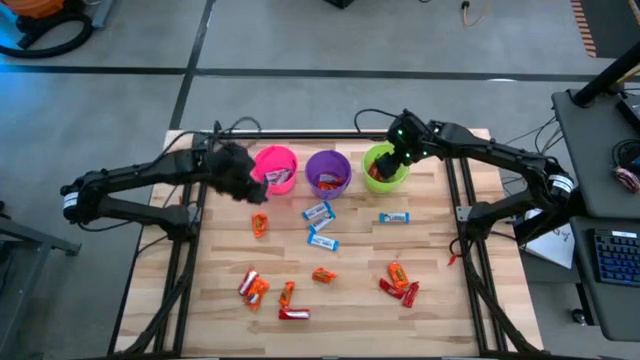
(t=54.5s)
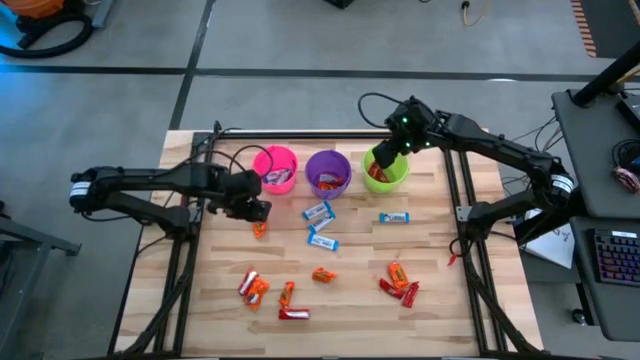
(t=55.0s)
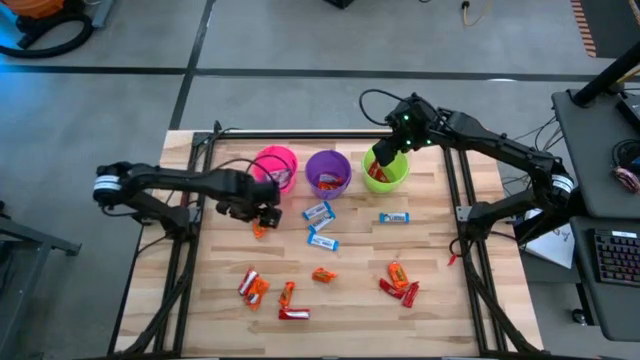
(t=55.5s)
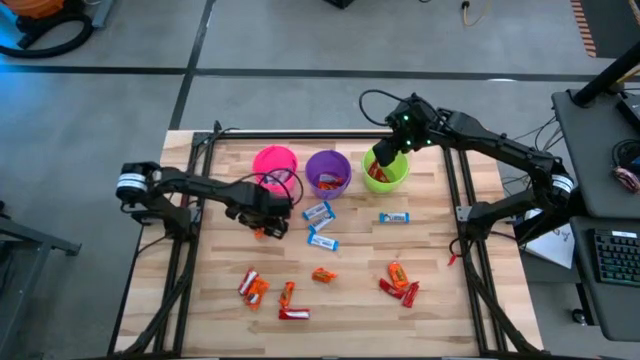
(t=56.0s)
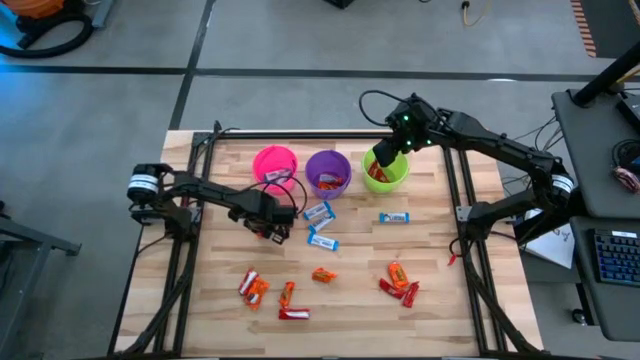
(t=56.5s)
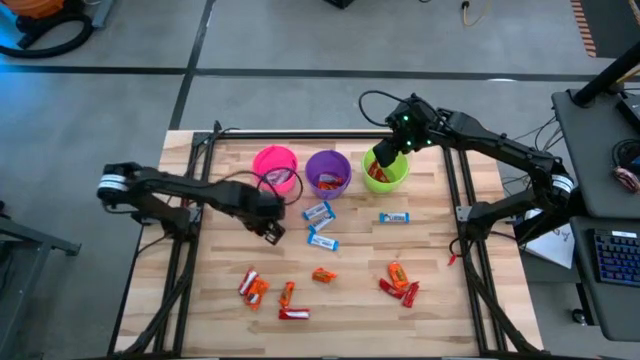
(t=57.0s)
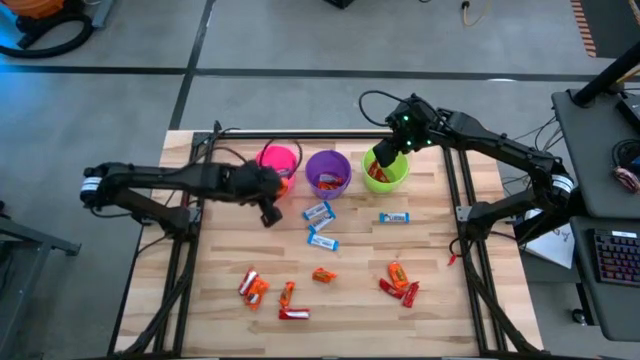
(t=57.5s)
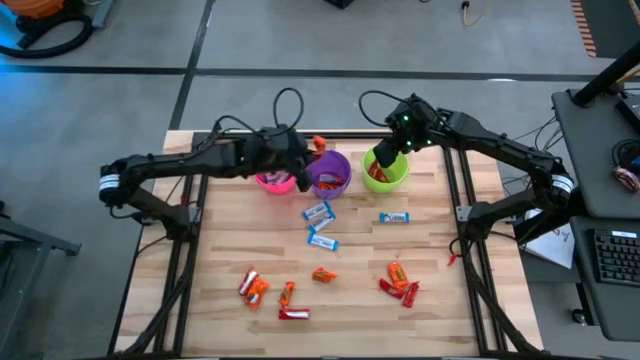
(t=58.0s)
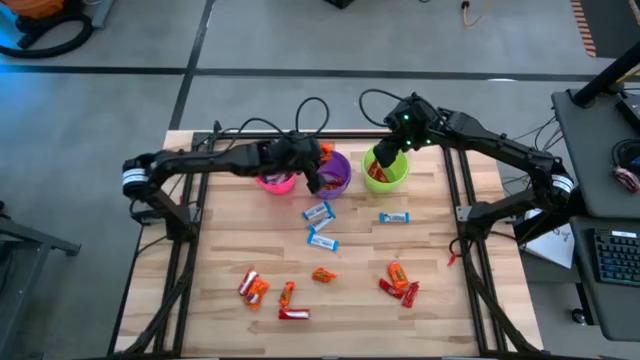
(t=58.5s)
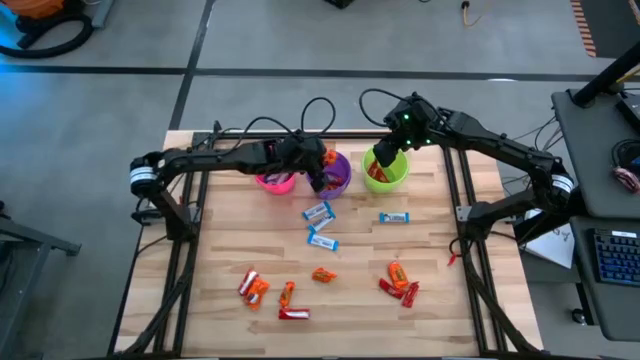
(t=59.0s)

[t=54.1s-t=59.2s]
Task: Organize candy in baskets
Put the orange chocolate into the violet bucket

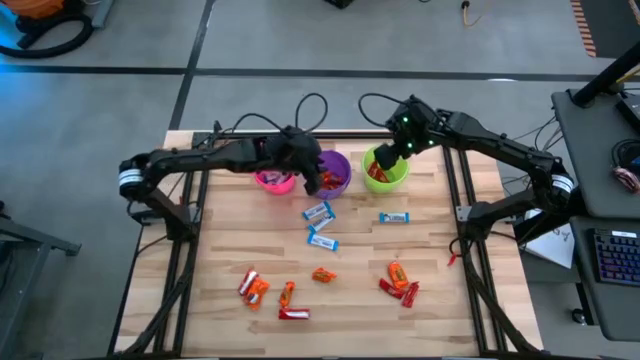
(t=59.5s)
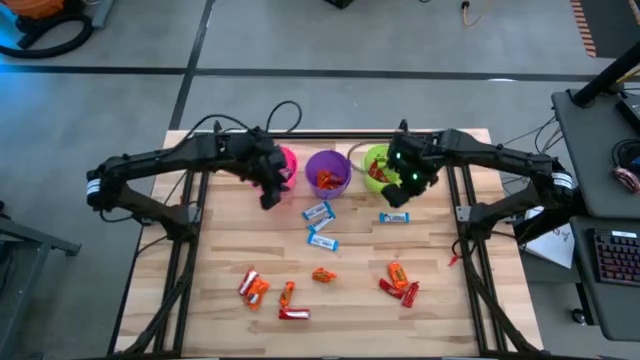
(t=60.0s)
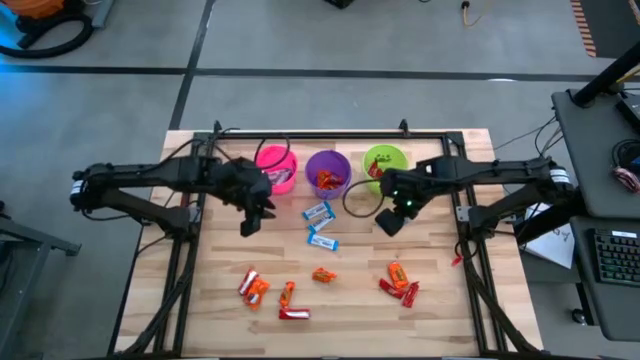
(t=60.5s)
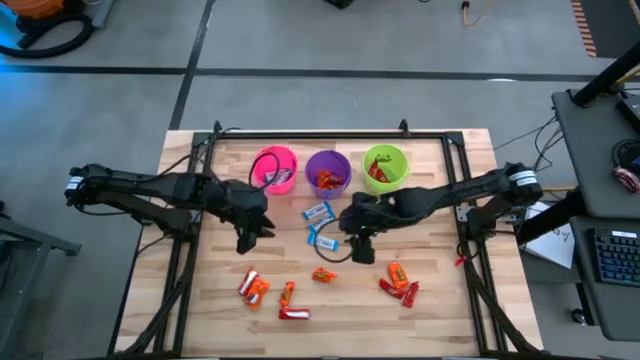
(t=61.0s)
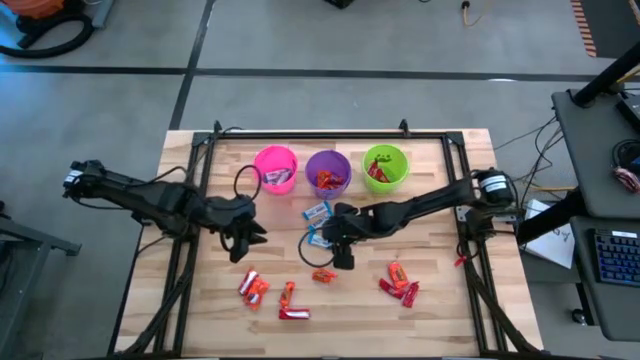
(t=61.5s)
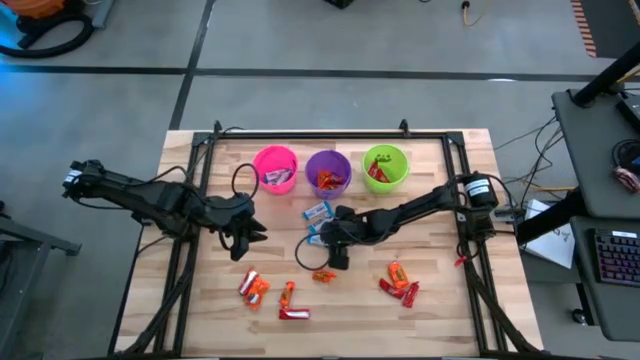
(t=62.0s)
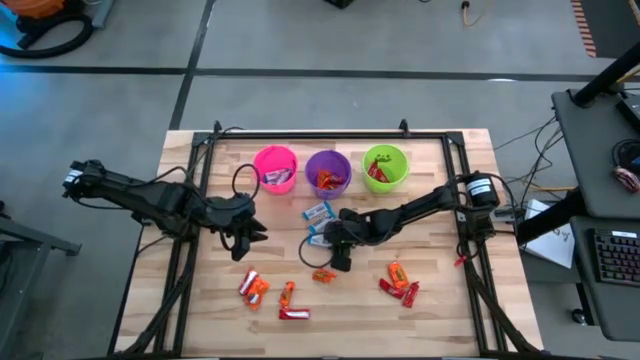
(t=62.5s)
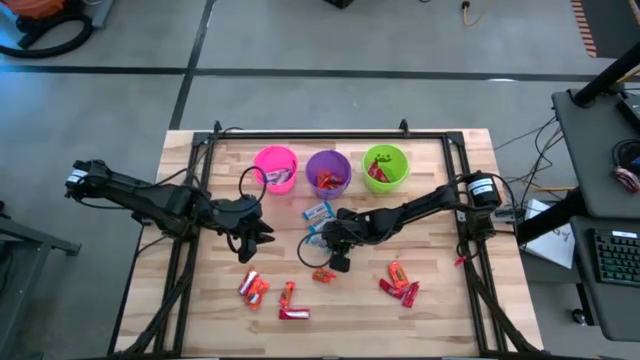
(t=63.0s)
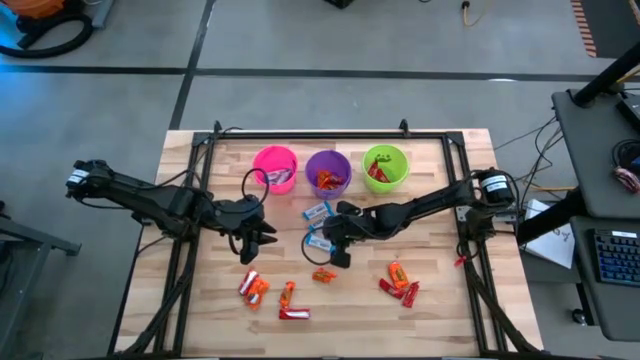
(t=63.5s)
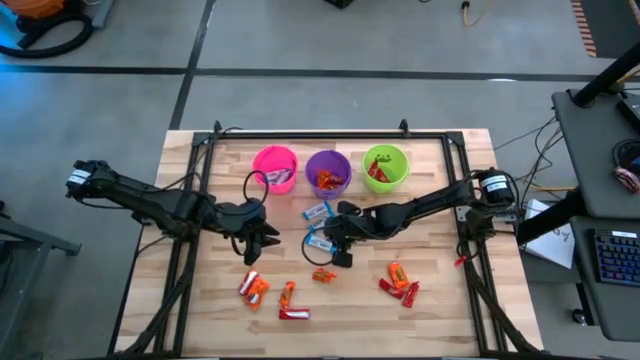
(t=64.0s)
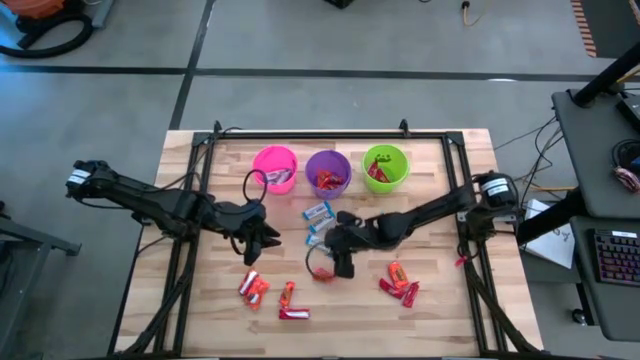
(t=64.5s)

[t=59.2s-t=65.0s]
Put the white chocolate into the pink bucket

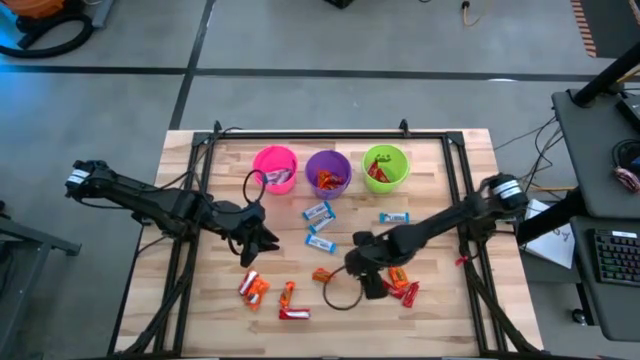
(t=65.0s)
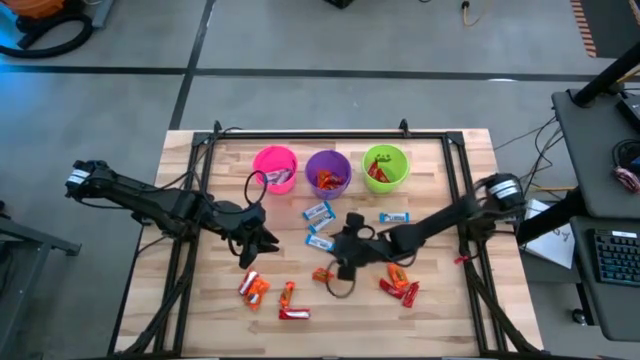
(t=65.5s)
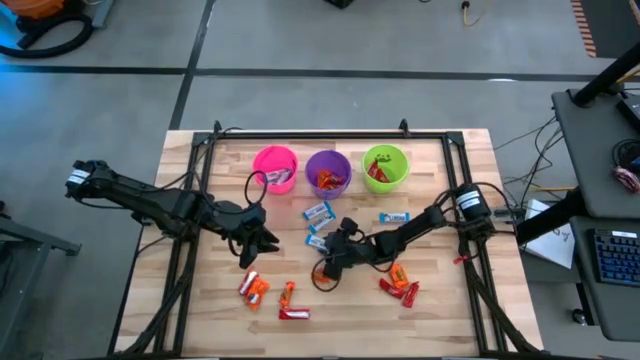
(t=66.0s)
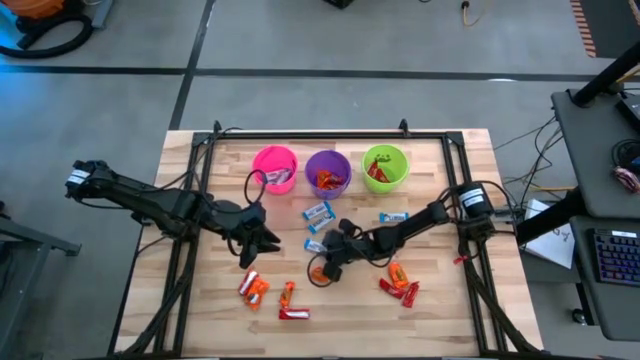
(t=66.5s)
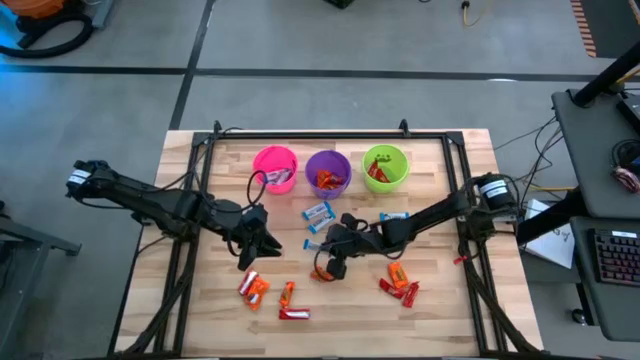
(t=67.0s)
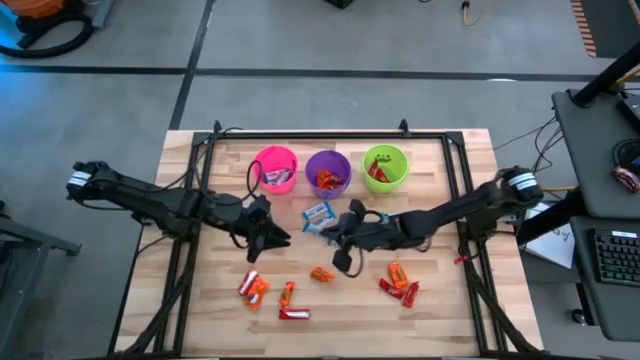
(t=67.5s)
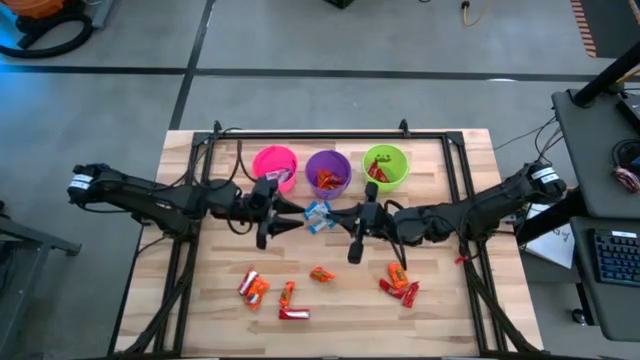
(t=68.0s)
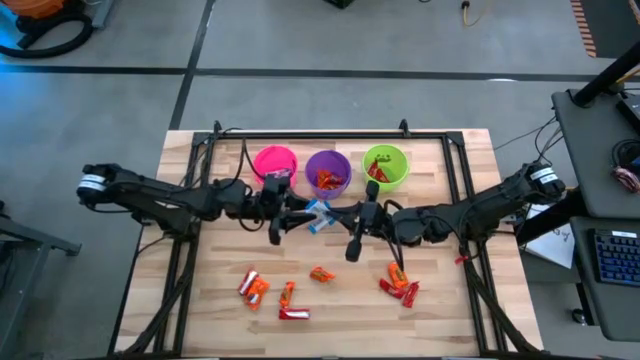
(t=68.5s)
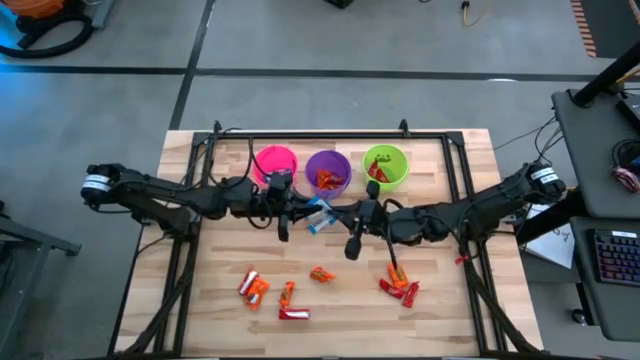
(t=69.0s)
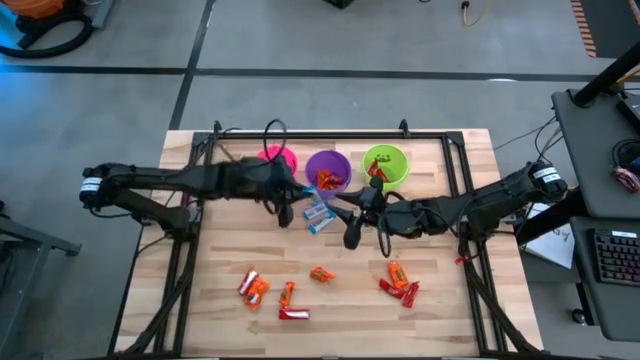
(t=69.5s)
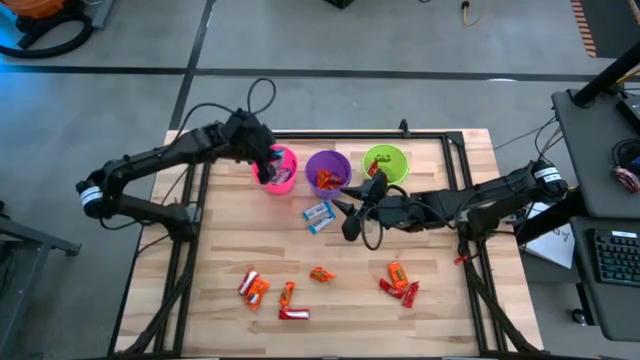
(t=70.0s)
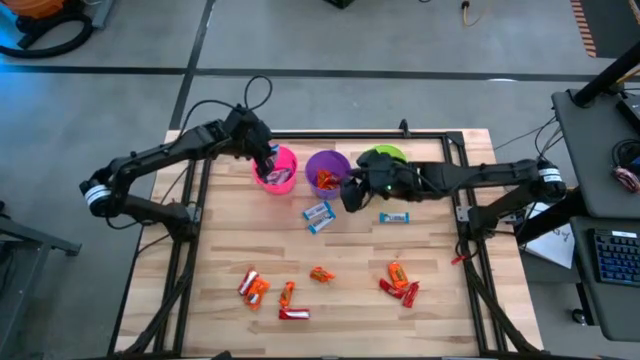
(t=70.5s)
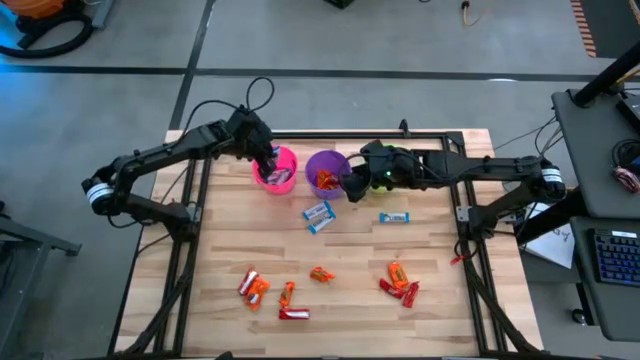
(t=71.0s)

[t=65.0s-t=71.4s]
Put the white chocolate into the pink bucket

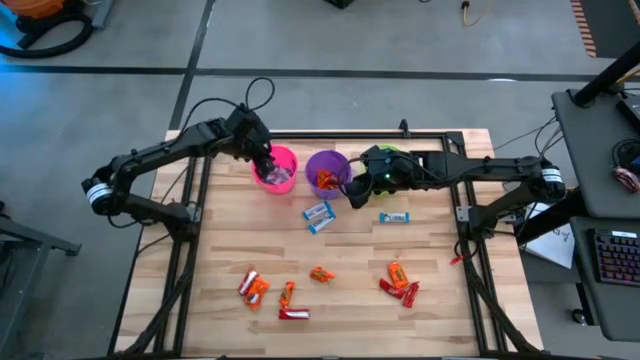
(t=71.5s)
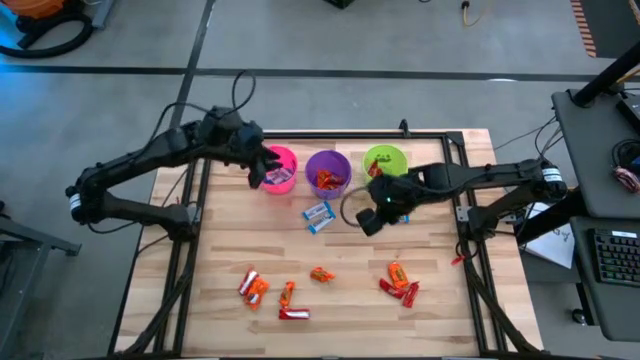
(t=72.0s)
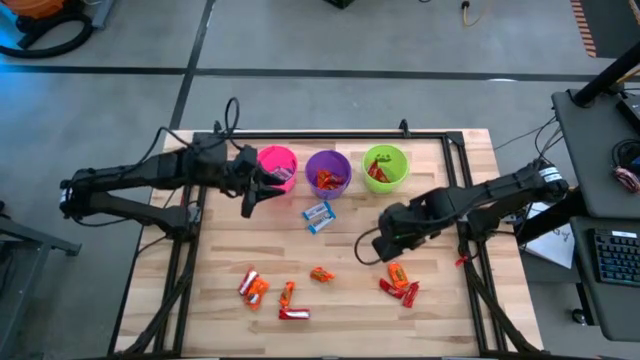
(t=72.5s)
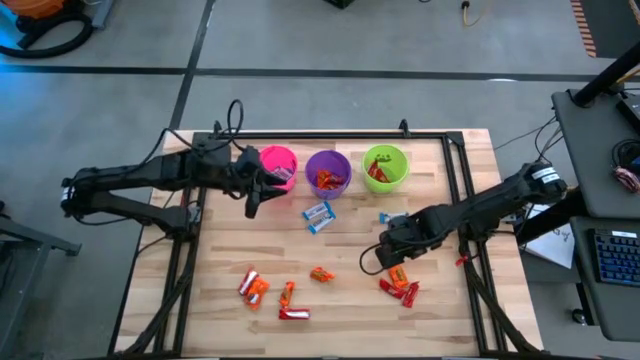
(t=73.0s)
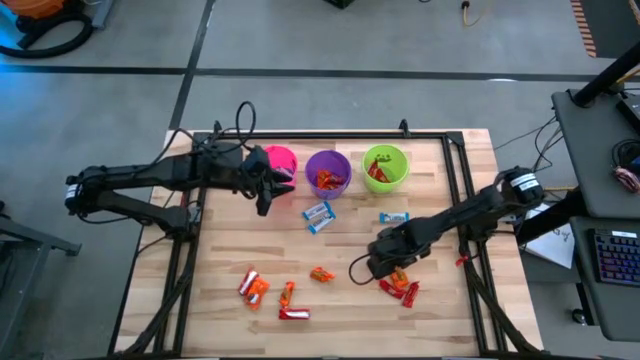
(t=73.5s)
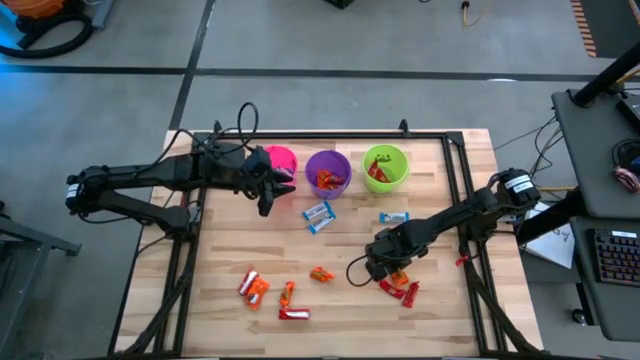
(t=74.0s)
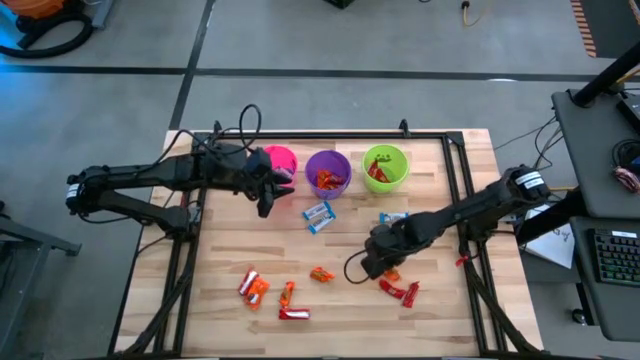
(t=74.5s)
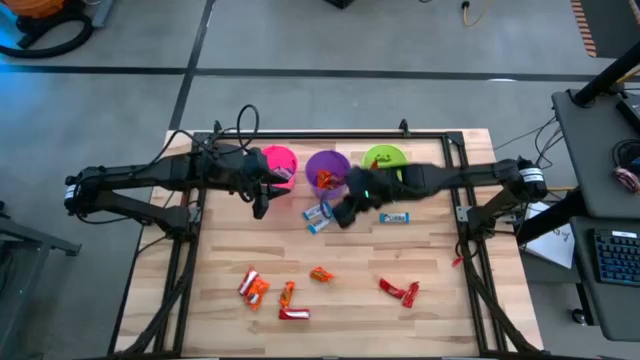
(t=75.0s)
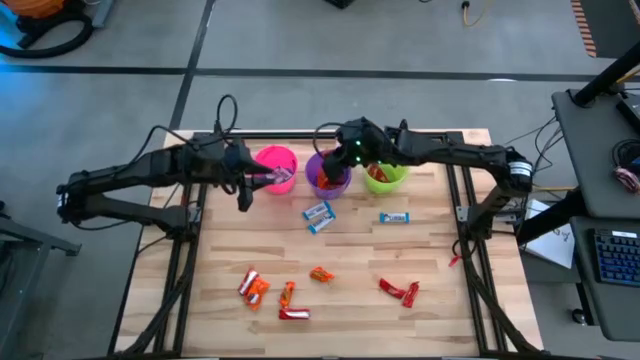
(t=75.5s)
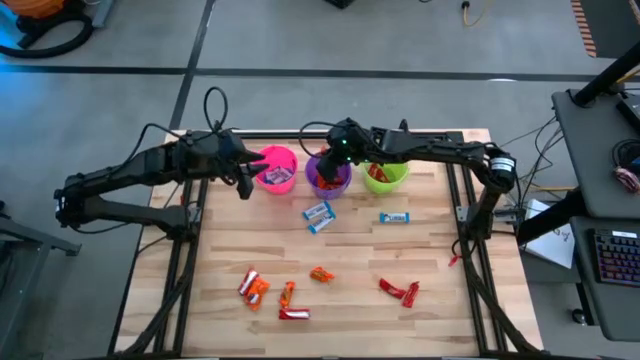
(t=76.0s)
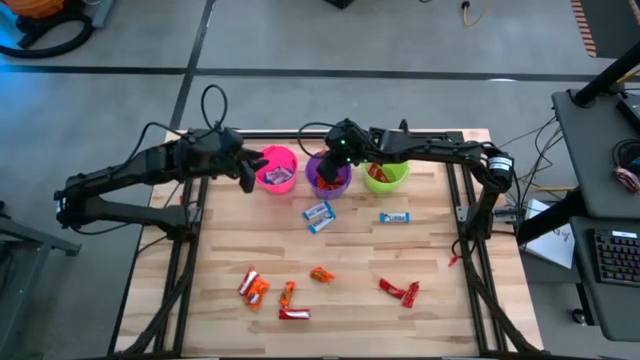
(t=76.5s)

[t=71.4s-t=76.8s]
Put the orange chocolate into the violet bucket
